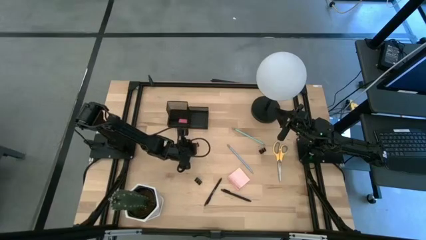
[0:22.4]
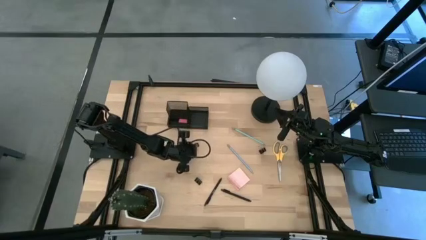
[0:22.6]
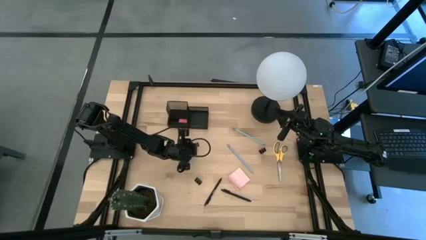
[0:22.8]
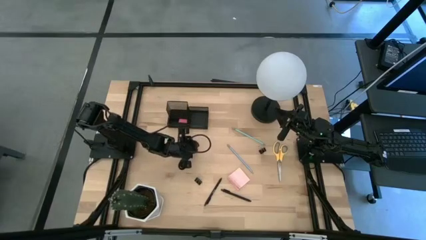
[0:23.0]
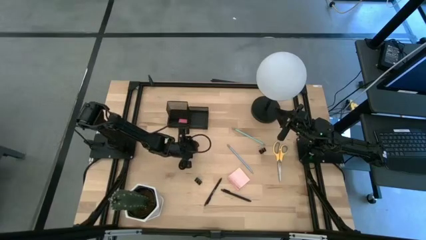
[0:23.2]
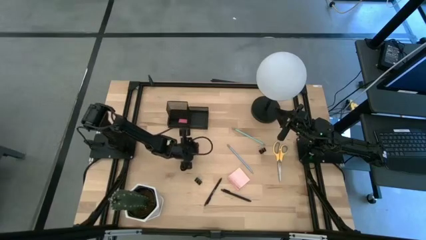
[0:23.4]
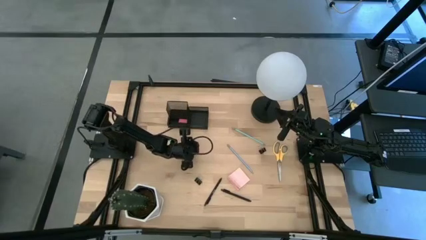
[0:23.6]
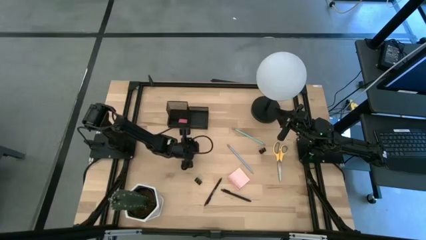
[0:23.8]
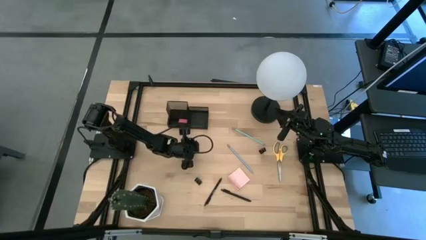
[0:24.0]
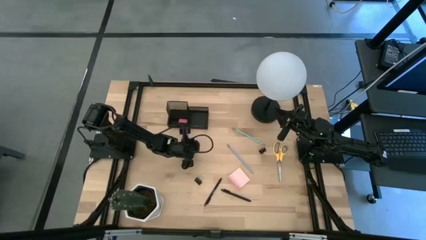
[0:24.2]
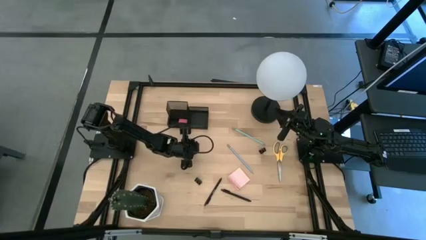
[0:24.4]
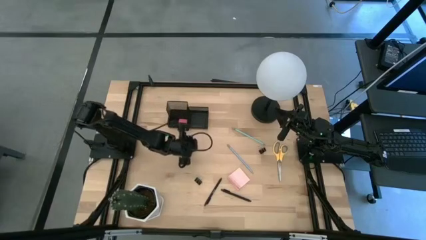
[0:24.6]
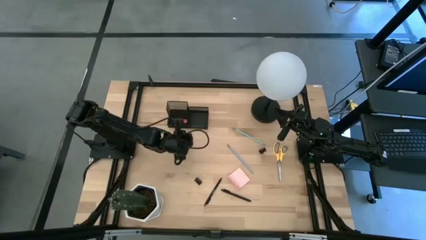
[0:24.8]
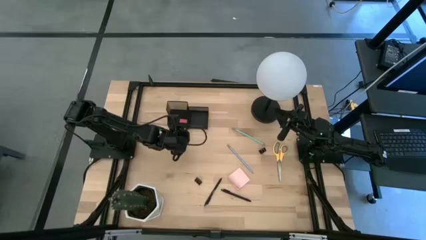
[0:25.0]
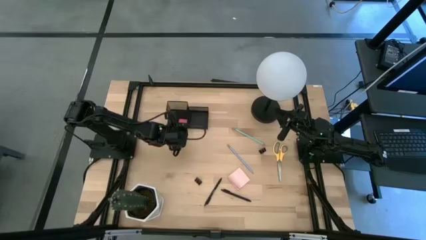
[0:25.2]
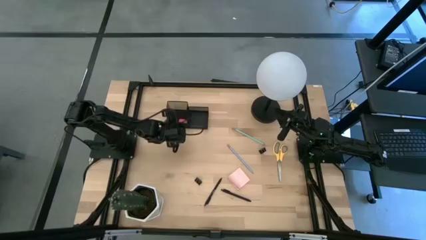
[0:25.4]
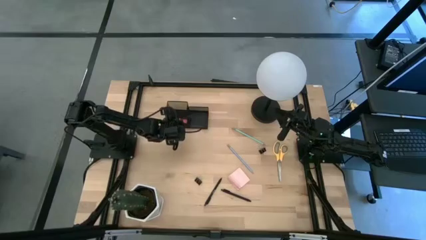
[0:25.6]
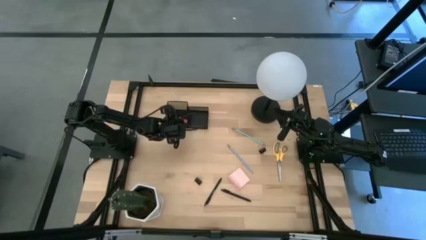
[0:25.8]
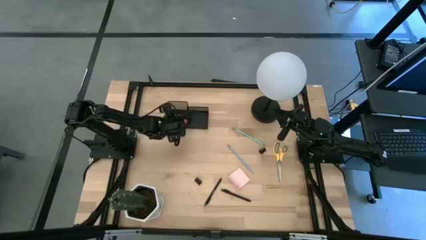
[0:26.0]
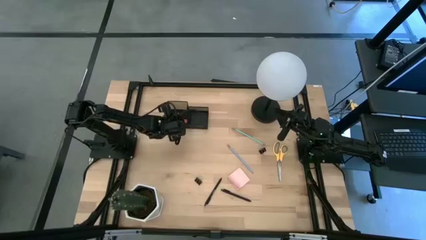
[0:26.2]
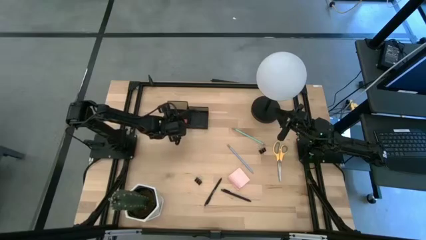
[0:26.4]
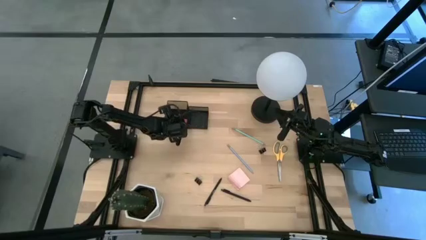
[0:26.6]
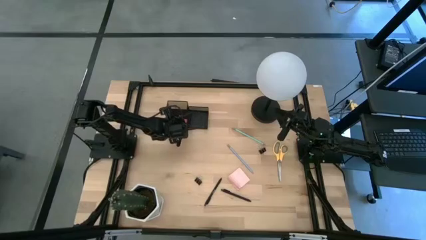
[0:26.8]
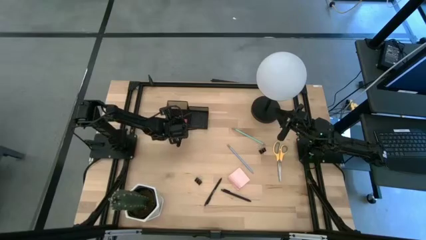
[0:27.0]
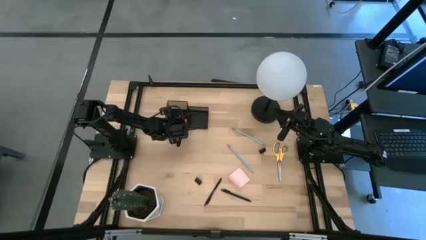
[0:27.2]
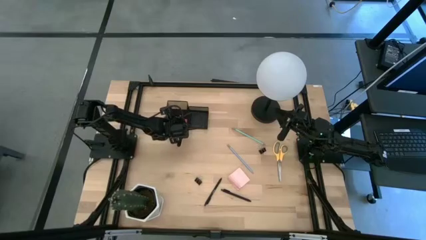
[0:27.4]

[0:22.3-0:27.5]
Task: Pick and place office supplies into organizer
Put the top left binder clip into the desk organizer

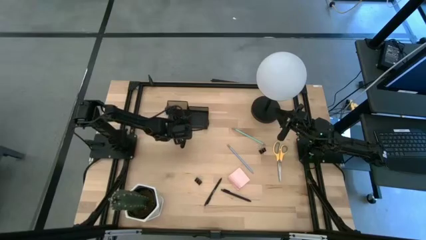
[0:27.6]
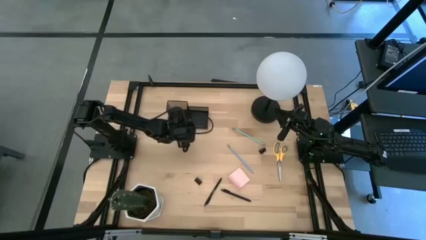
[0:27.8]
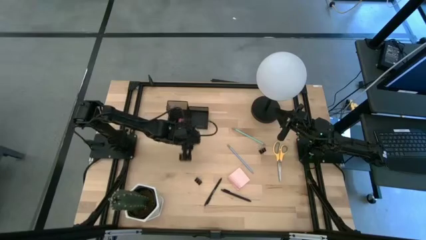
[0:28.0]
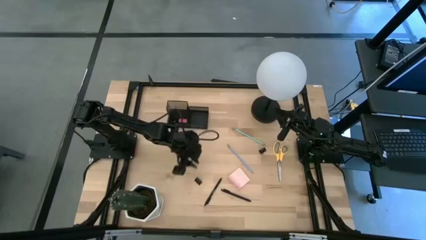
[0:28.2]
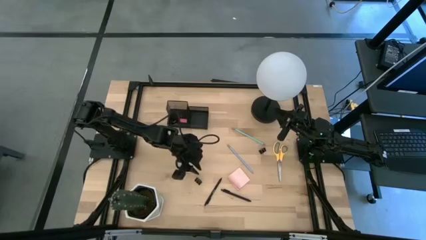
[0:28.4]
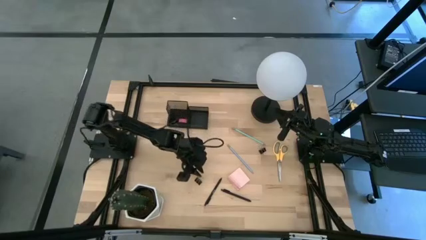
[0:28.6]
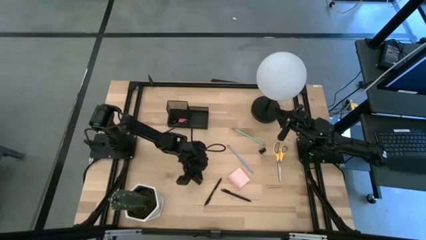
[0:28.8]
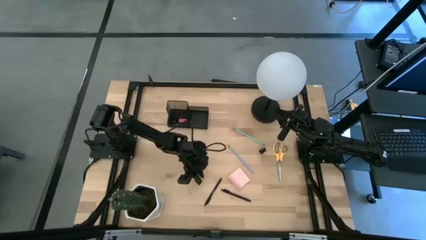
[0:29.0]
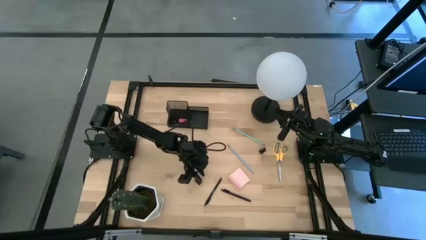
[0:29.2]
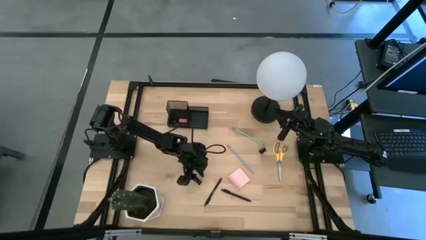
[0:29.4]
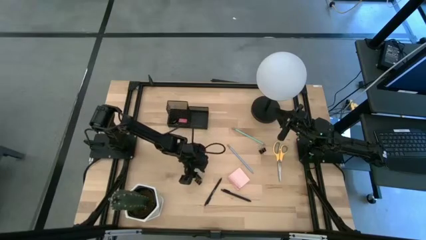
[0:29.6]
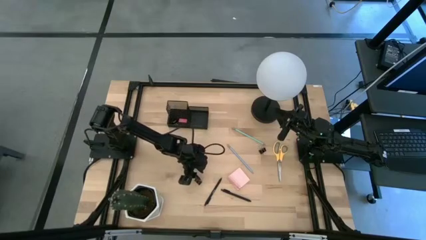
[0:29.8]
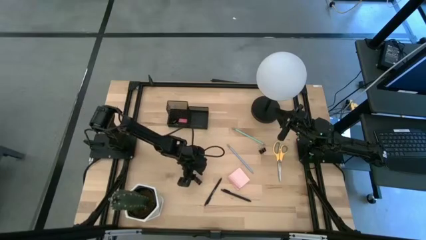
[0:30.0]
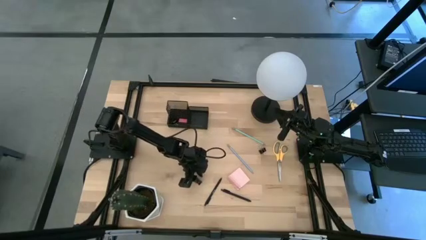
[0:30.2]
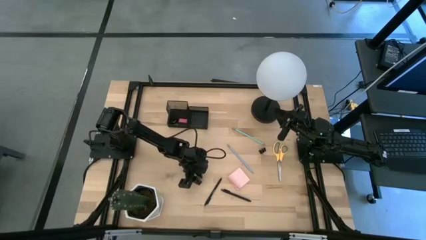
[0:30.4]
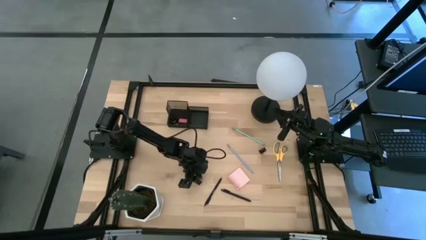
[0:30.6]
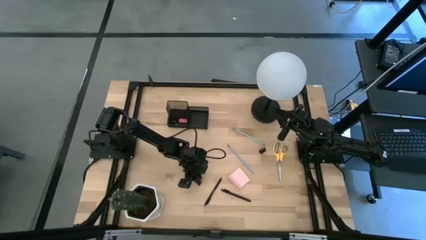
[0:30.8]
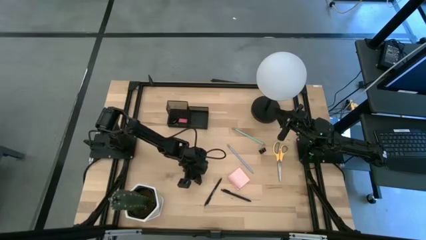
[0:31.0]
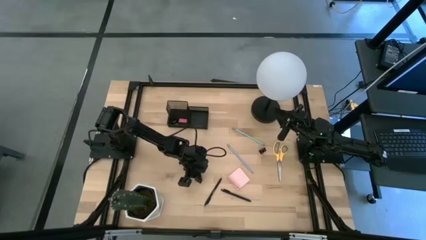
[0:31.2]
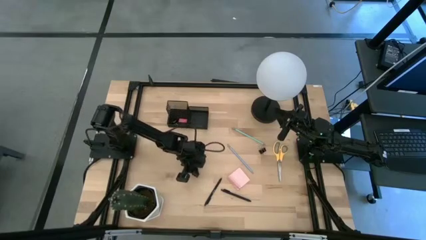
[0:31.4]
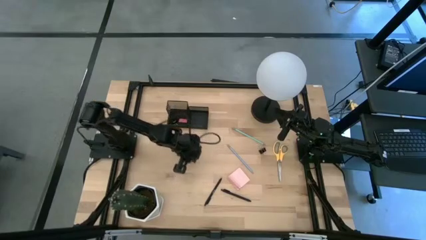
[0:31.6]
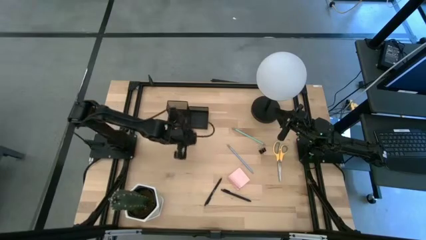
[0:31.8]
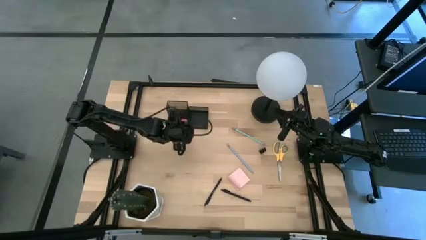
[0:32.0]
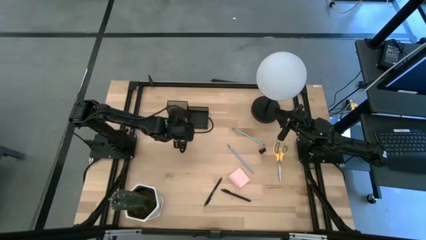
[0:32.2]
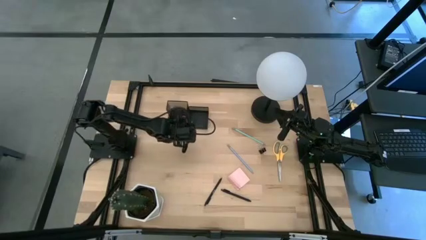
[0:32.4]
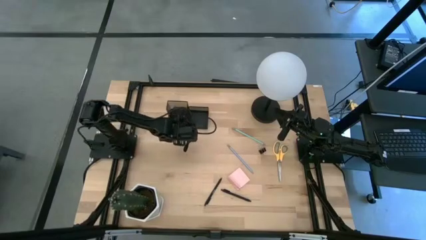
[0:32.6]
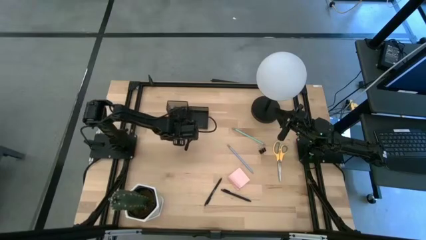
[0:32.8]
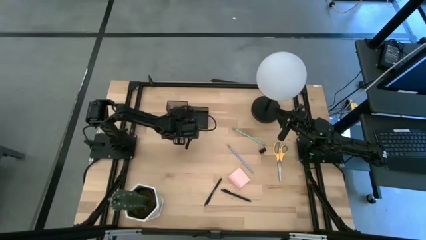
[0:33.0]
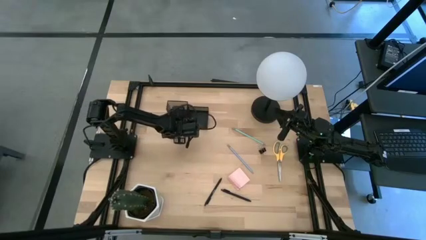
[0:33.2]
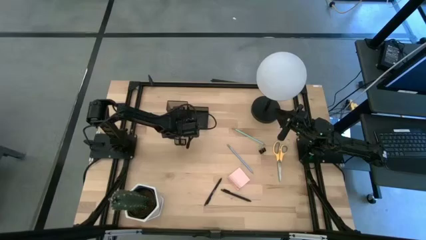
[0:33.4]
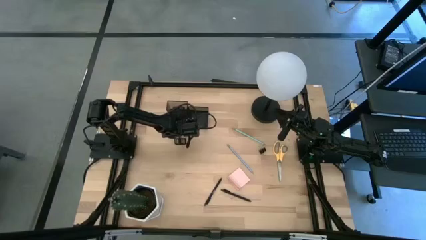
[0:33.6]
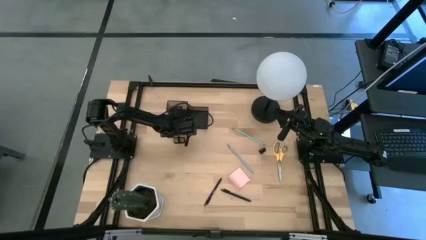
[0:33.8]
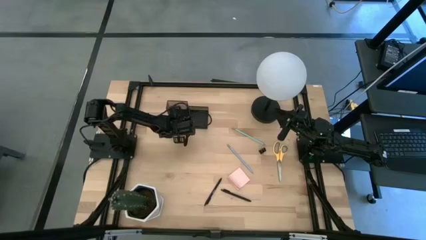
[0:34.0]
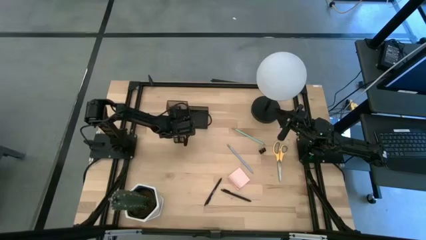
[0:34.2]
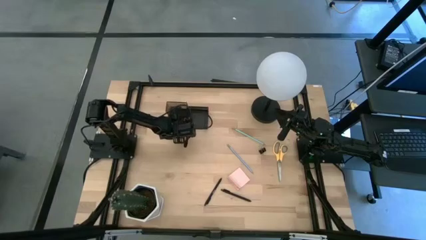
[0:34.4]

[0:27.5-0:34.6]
Put the bottom binder clip into the desk organizer

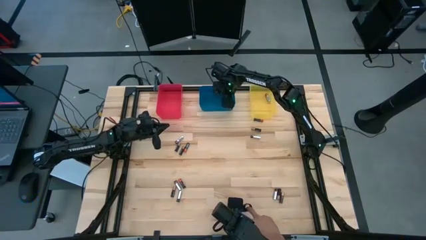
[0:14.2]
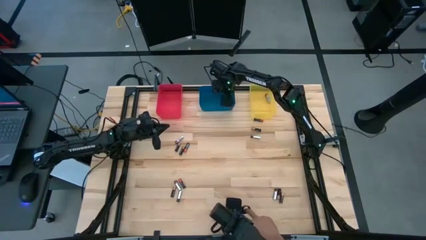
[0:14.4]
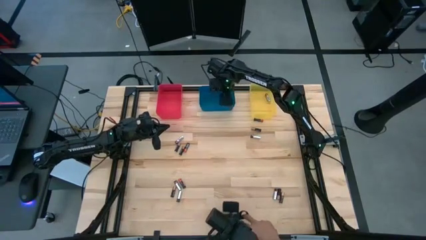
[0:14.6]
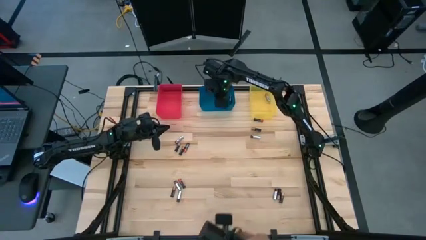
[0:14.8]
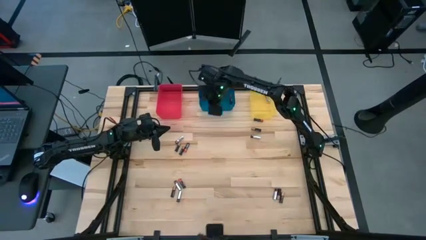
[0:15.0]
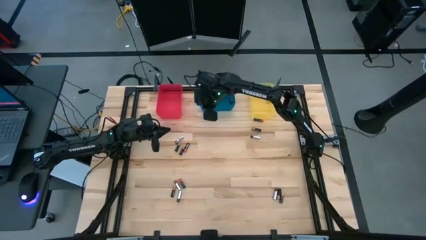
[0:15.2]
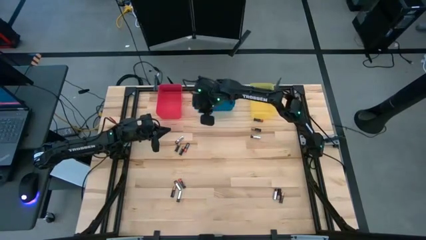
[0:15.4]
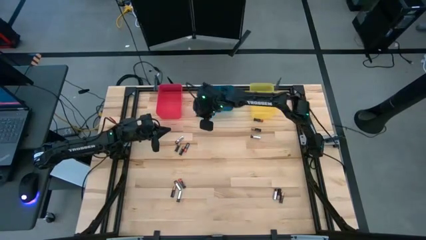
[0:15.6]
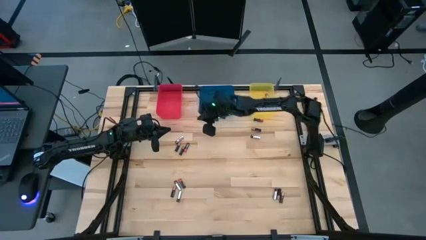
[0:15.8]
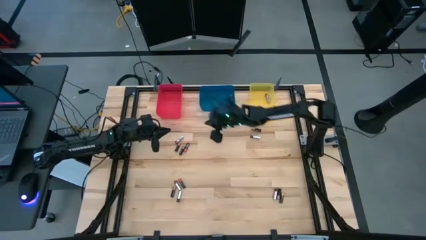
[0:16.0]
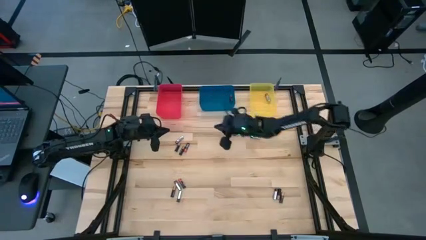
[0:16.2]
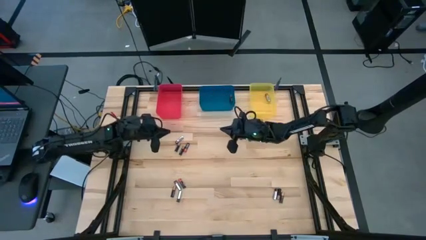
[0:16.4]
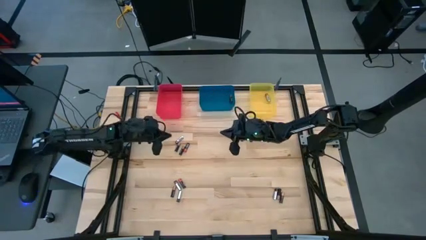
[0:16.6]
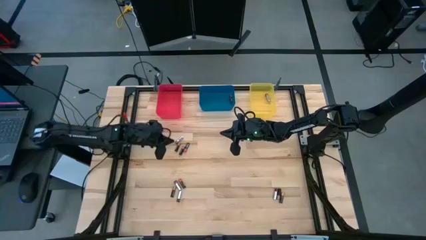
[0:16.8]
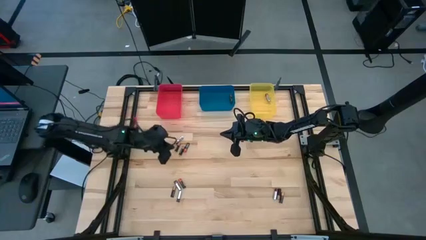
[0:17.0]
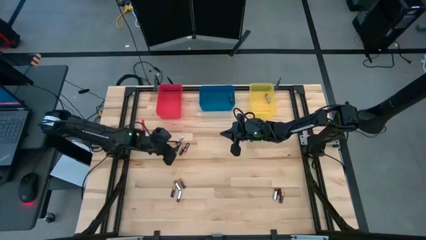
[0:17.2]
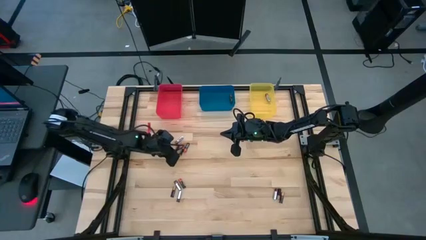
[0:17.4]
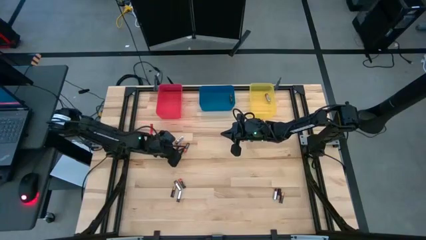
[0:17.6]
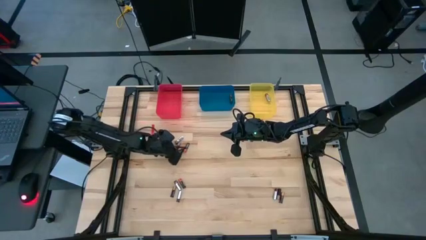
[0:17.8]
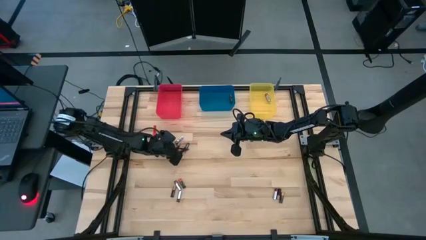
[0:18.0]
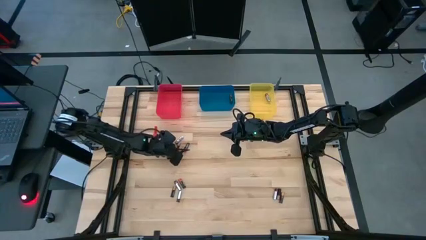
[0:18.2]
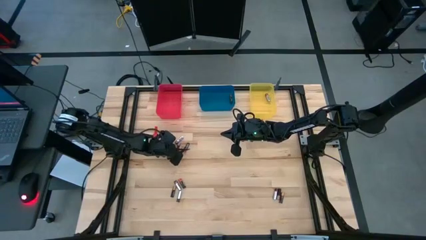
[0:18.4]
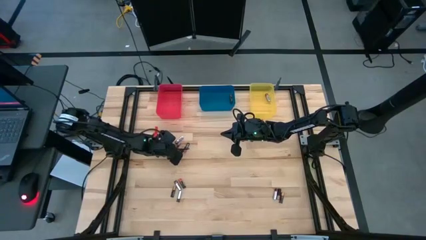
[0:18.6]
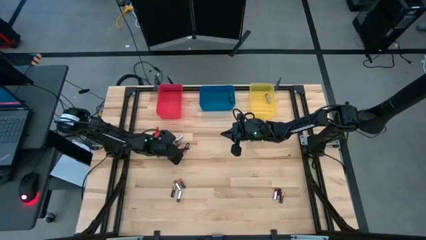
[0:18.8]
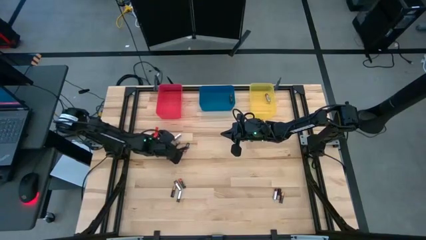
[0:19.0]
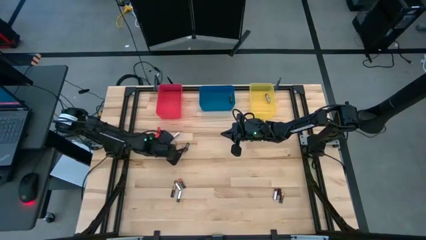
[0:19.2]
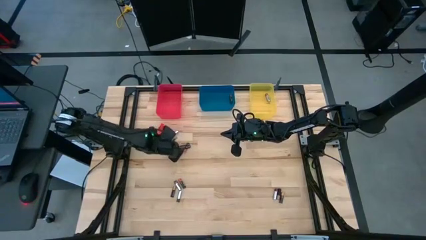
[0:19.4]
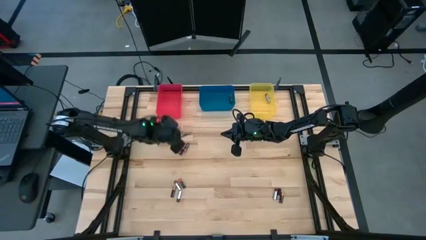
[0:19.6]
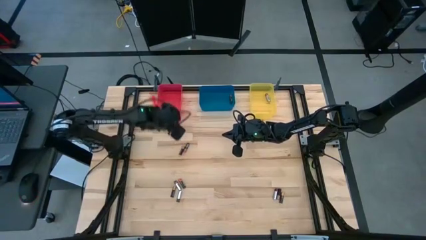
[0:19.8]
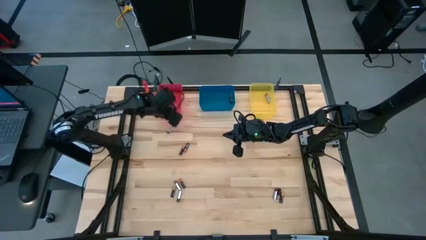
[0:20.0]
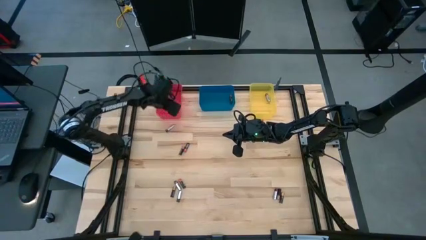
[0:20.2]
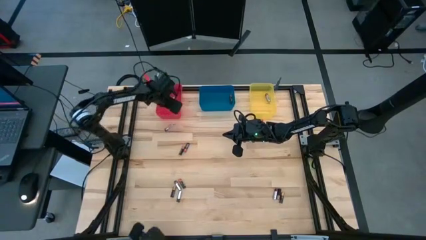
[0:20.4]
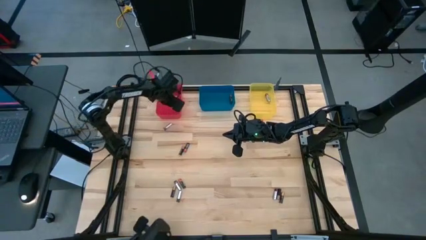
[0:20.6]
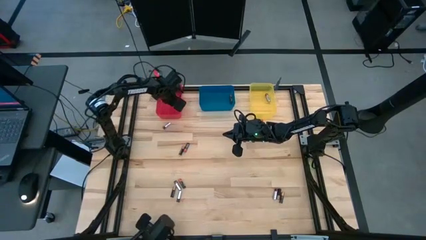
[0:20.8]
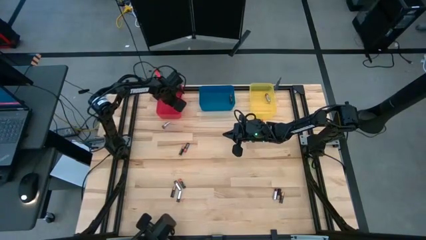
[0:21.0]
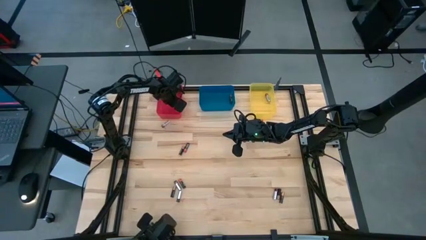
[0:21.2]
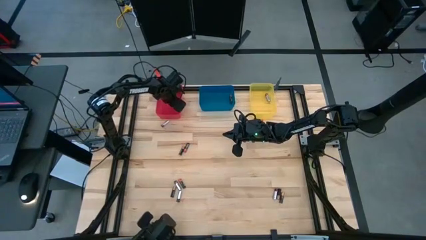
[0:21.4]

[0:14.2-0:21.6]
Task: Sort batteries
Put the brown battery into the red bin
